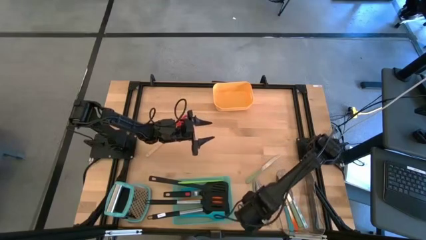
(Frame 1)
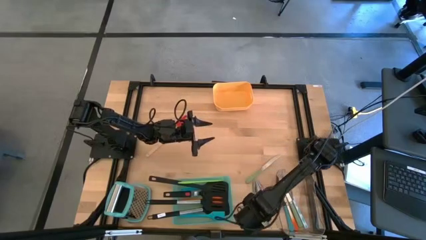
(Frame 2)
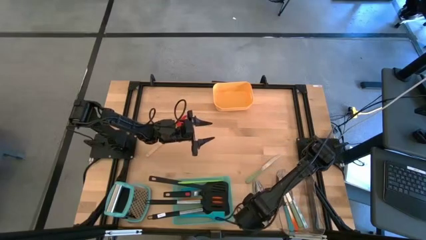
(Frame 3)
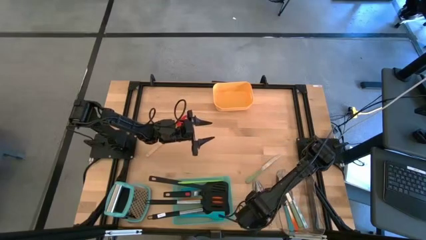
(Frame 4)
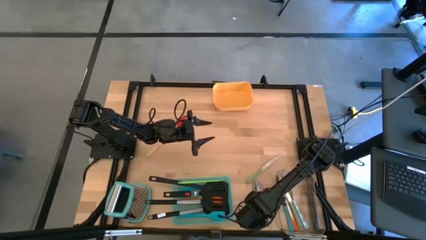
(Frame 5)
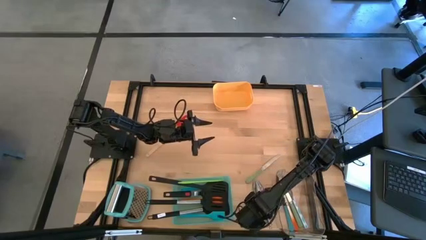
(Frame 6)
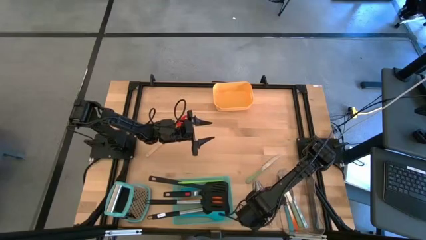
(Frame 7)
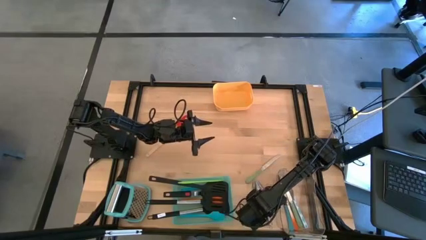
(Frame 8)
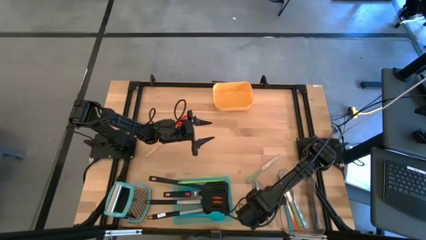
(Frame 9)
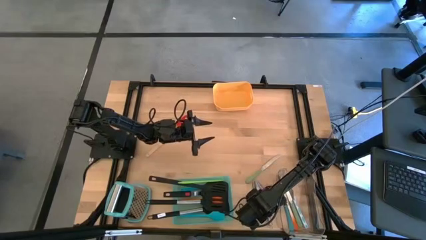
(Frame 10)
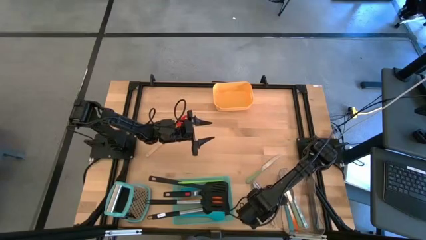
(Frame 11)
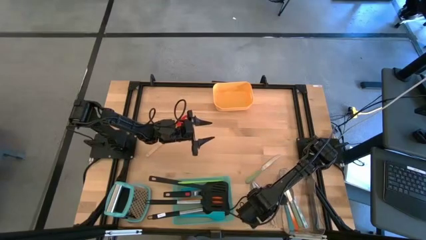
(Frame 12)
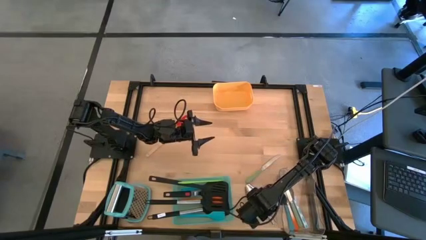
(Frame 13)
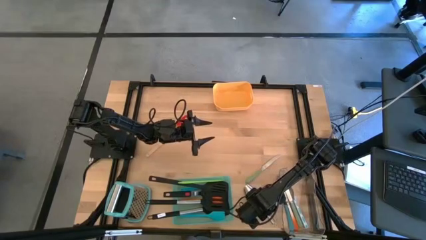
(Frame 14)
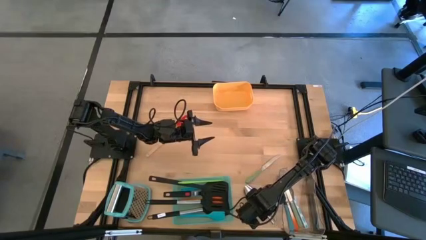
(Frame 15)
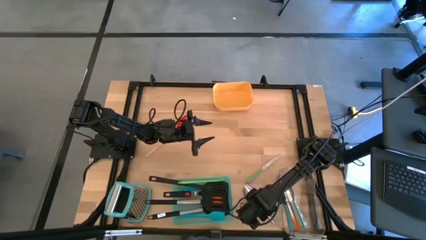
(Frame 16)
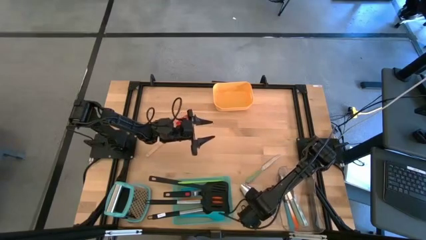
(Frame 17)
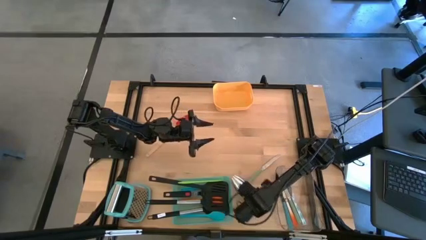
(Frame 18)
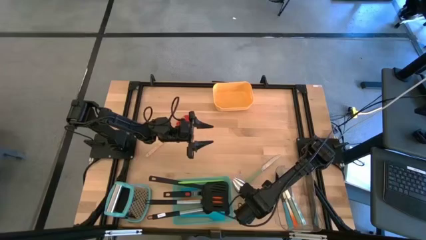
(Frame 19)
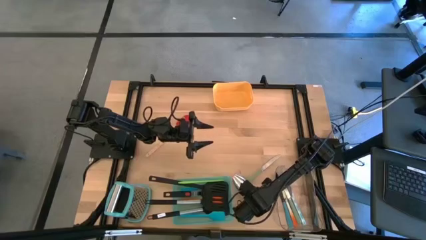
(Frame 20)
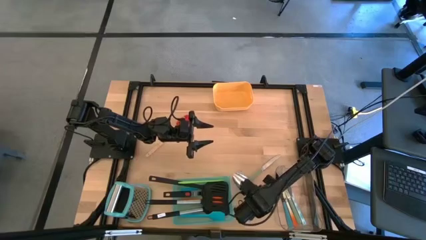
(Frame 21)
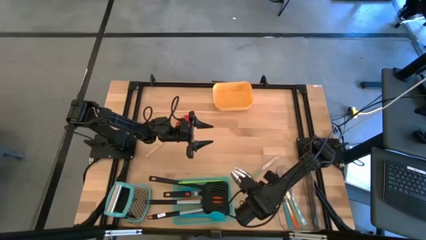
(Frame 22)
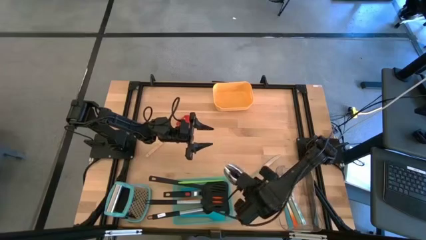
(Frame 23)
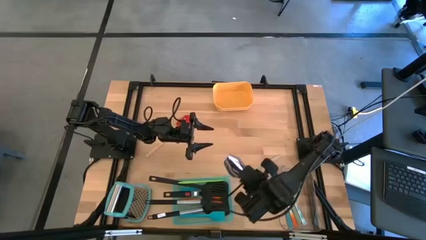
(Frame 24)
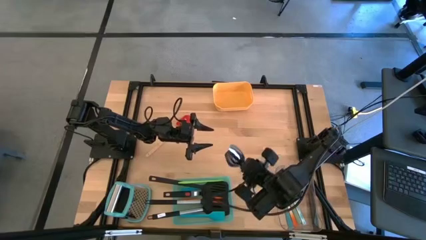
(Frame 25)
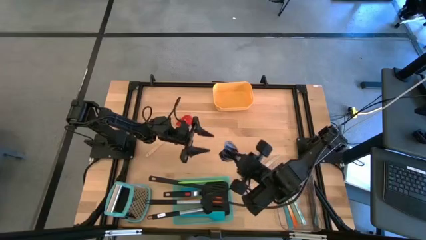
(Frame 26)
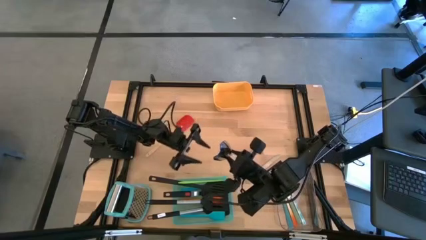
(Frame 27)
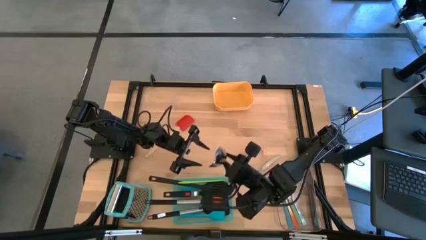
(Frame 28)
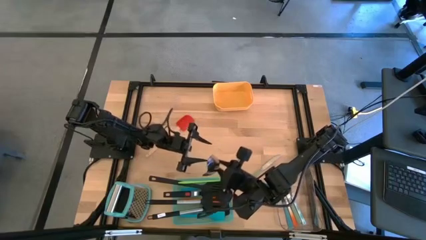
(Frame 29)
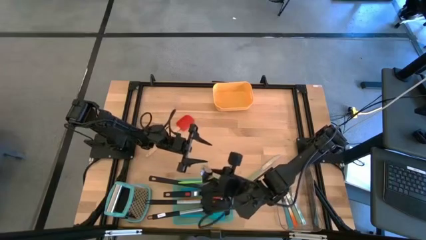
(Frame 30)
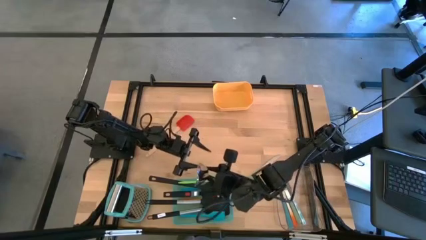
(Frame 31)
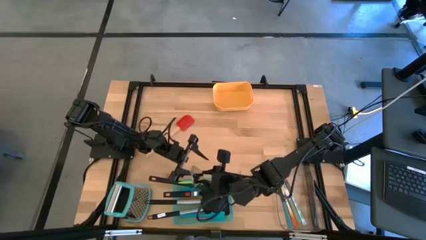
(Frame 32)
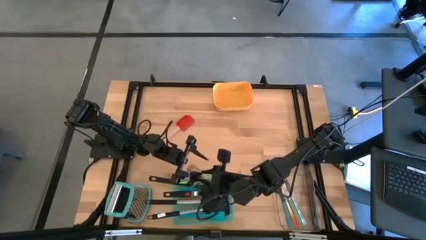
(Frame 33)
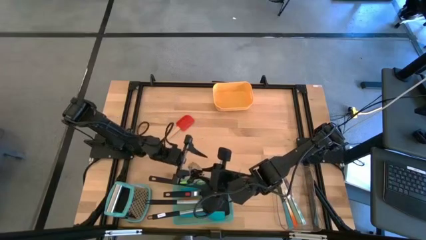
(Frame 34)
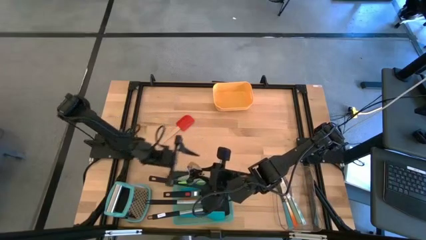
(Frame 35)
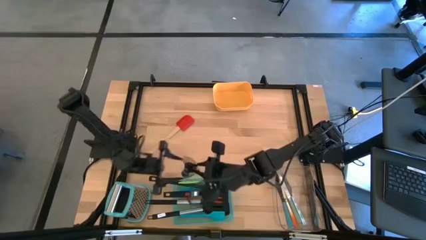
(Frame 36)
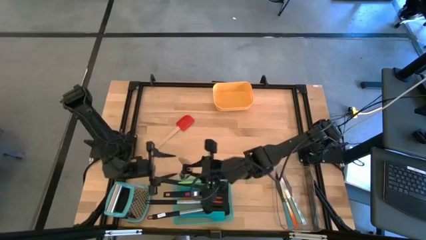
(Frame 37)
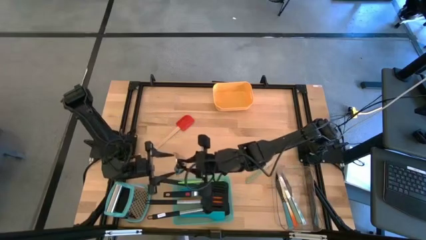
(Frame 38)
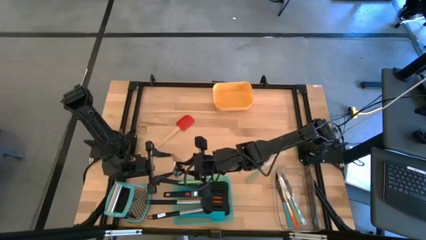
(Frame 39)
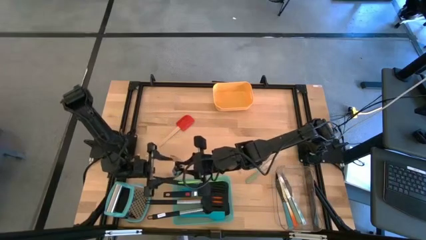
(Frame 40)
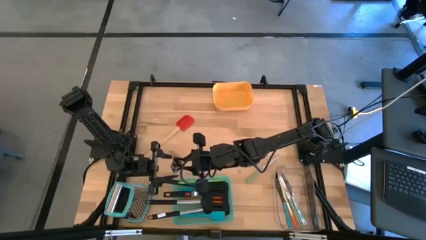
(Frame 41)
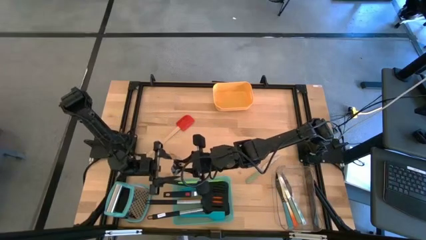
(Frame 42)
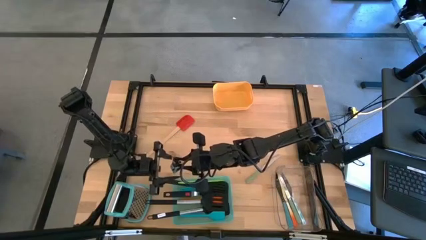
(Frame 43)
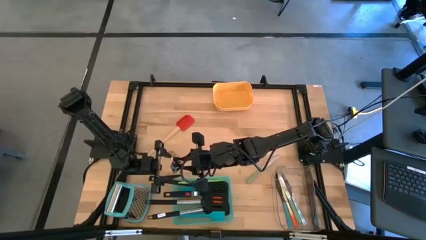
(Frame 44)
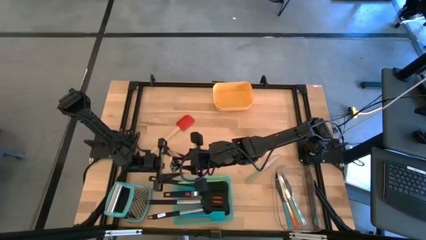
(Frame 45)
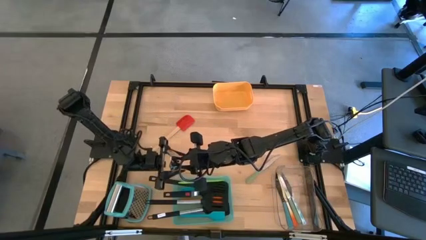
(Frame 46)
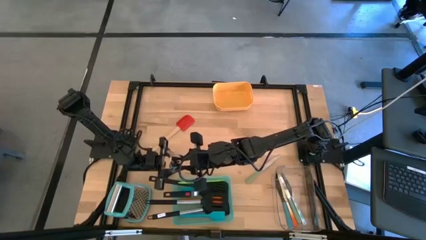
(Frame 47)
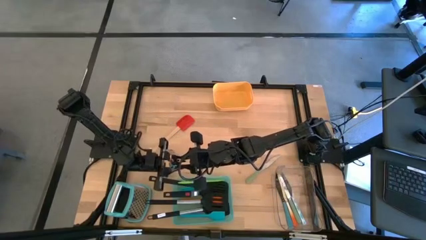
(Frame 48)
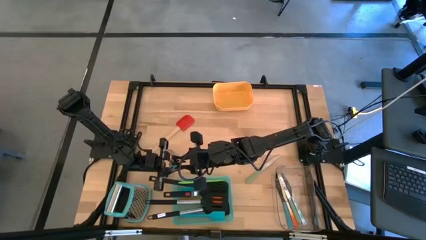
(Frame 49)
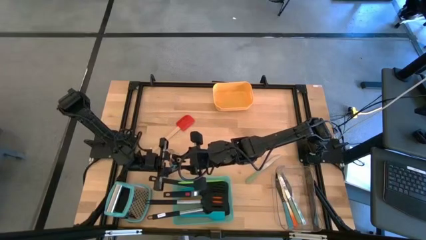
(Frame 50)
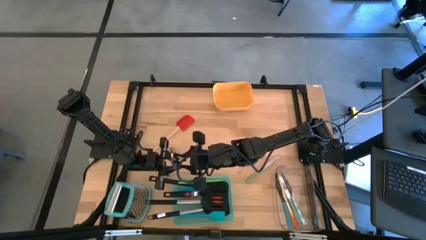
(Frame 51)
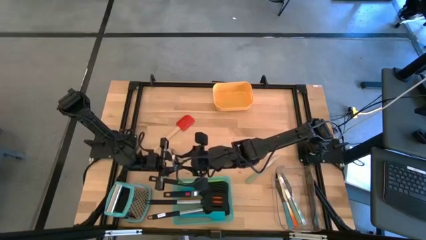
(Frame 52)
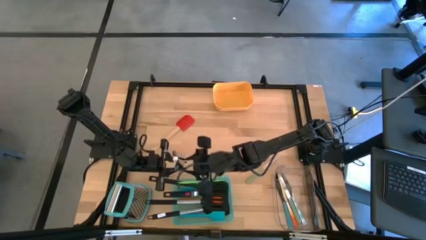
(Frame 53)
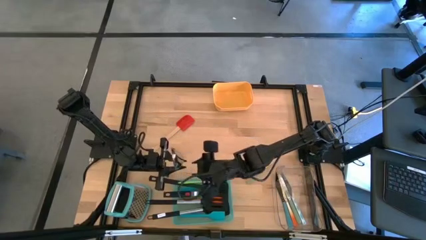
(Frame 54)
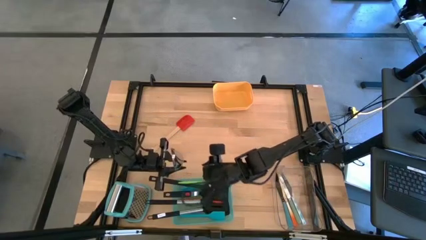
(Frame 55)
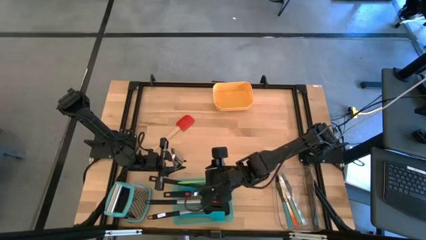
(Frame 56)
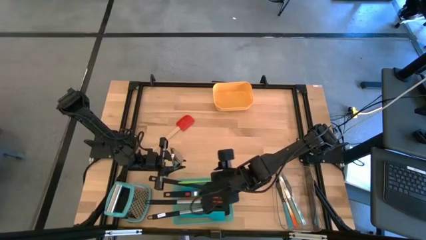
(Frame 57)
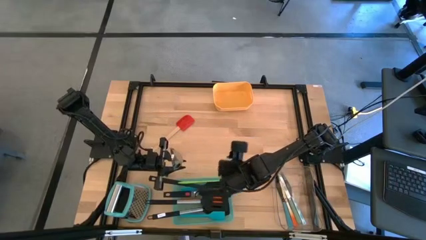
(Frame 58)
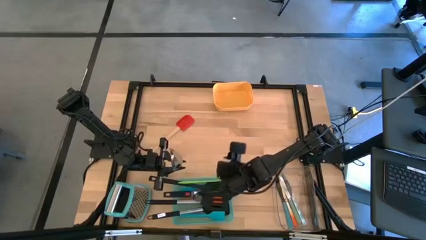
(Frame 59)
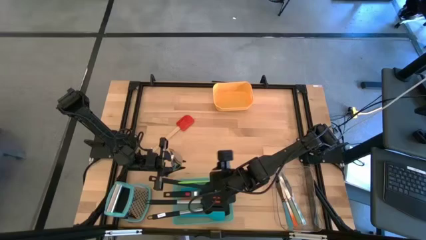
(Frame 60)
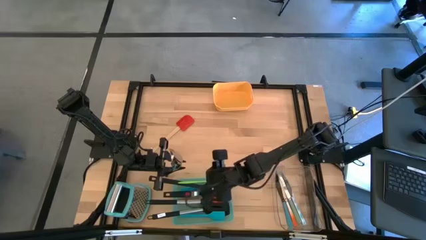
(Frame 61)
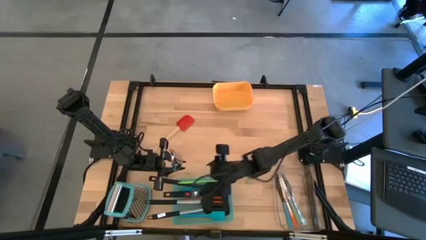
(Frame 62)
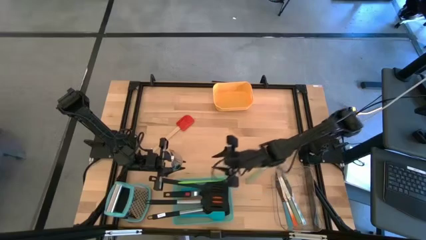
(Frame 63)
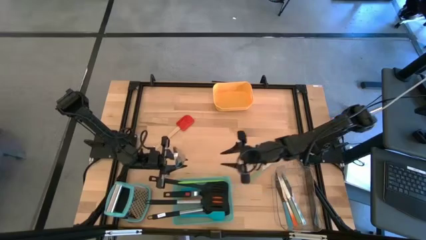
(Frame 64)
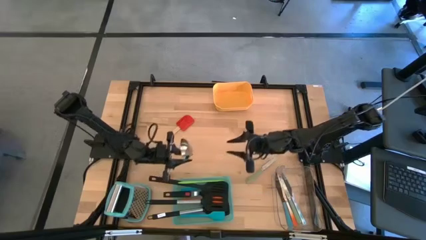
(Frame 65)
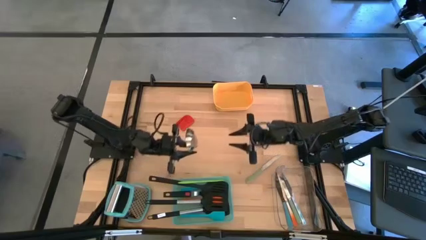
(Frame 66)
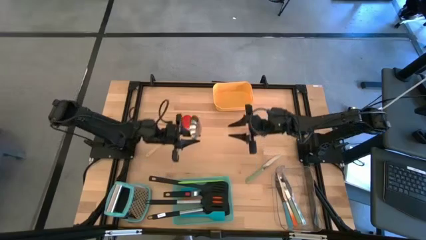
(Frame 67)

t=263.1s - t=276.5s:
Task: Pick & Place Kitchen Items
Put the ice scoop into the yellow bin
